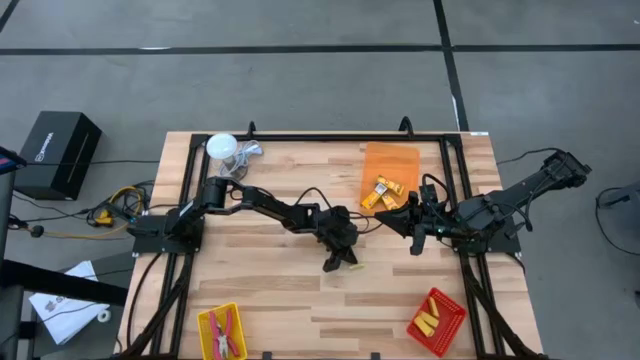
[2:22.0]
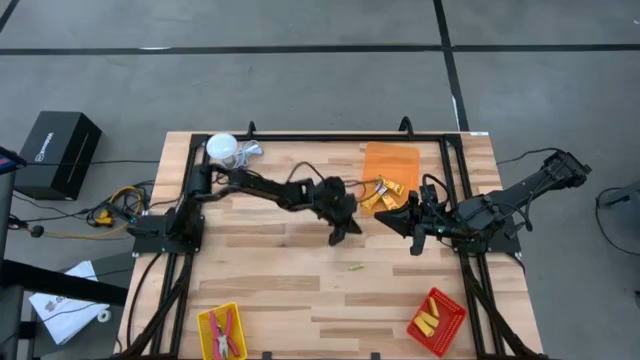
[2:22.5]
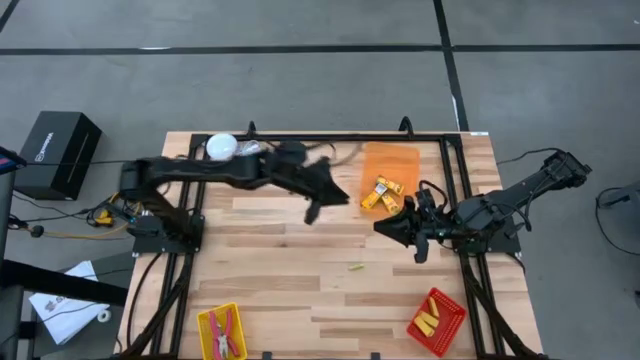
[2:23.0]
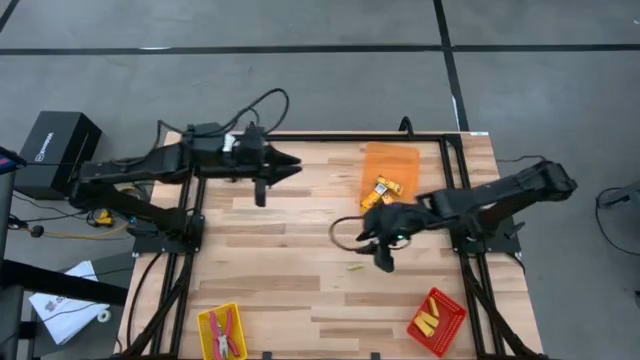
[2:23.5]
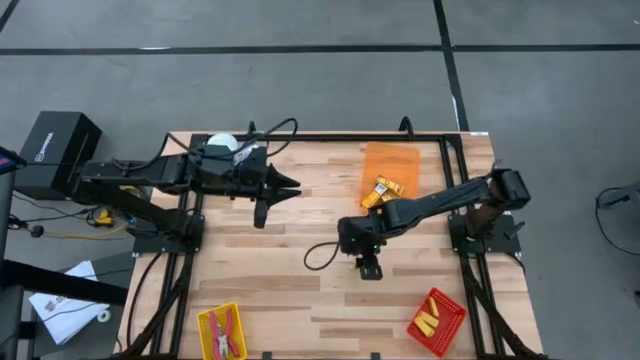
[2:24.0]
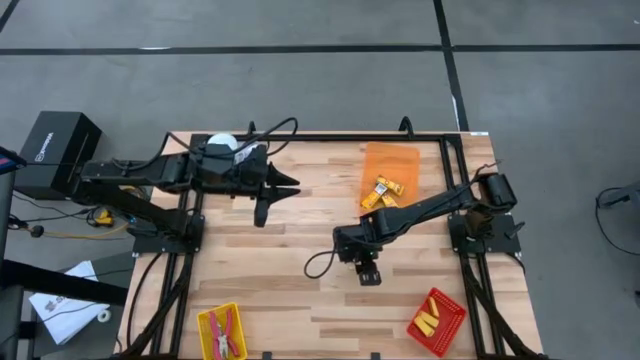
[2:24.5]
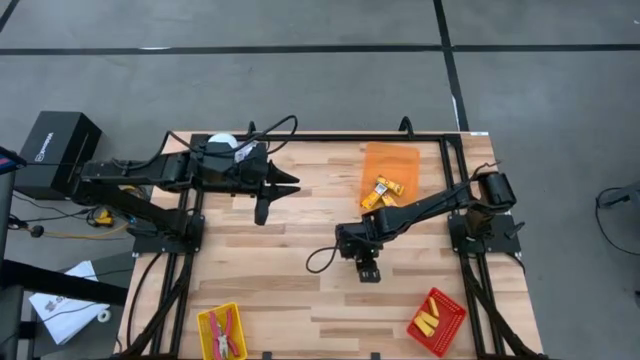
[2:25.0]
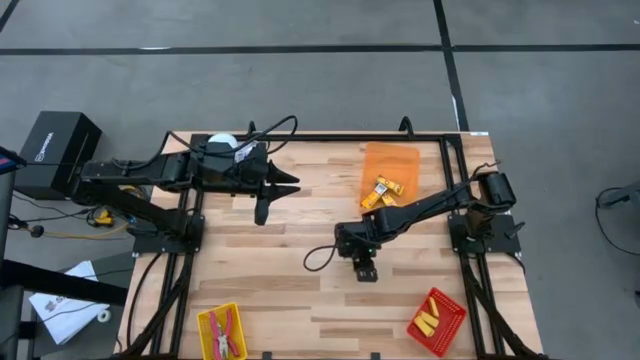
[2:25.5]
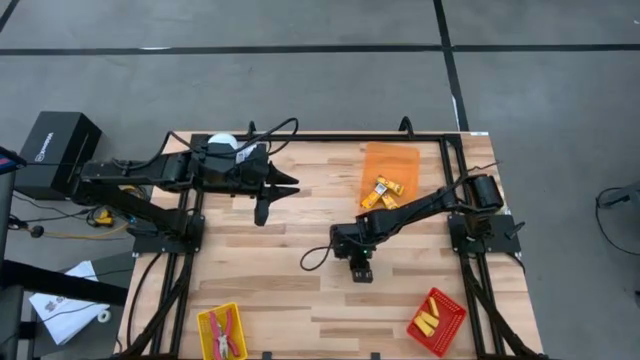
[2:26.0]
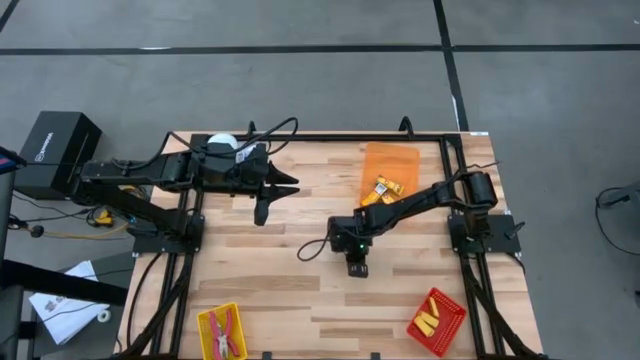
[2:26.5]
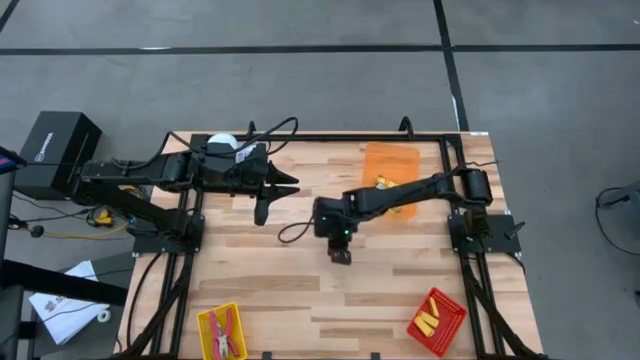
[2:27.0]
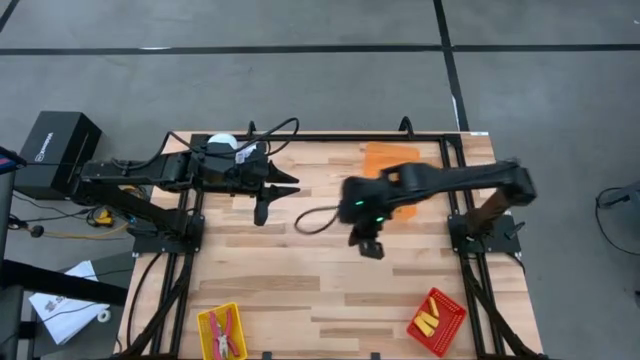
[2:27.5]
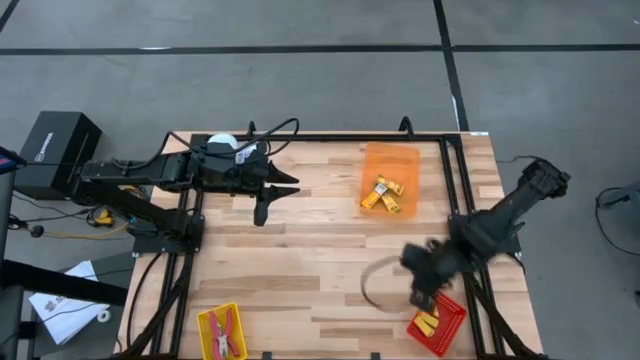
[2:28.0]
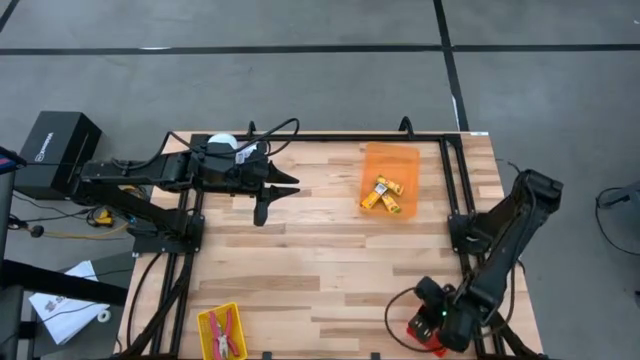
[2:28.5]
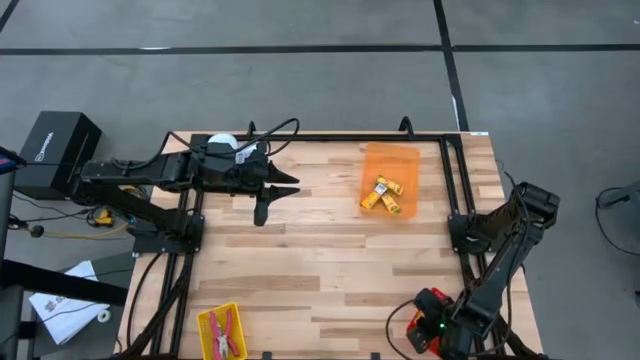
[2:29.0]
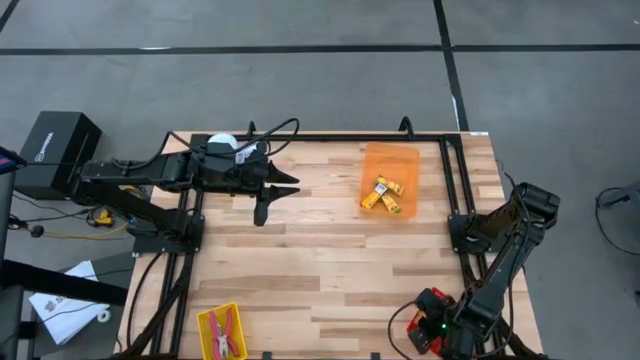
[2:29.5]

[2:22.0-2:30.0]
Task: Pick & Place School Supplies
Put the yellow eraser into the red bin

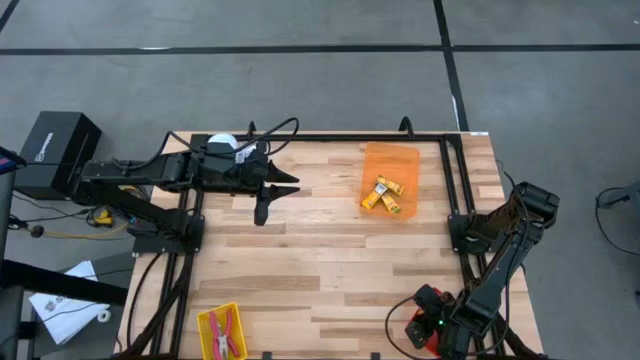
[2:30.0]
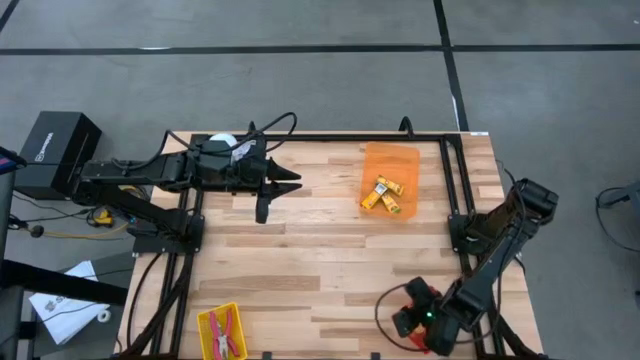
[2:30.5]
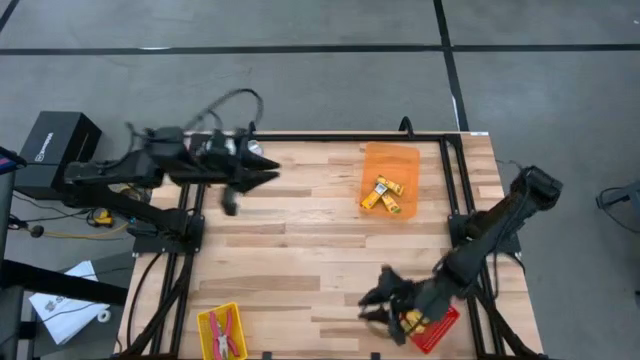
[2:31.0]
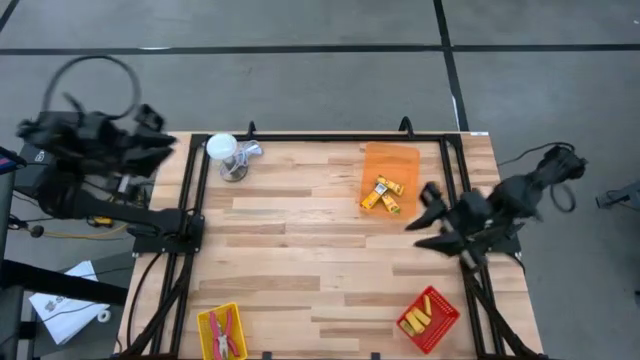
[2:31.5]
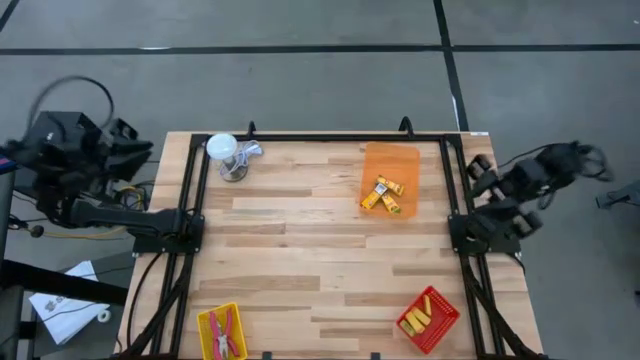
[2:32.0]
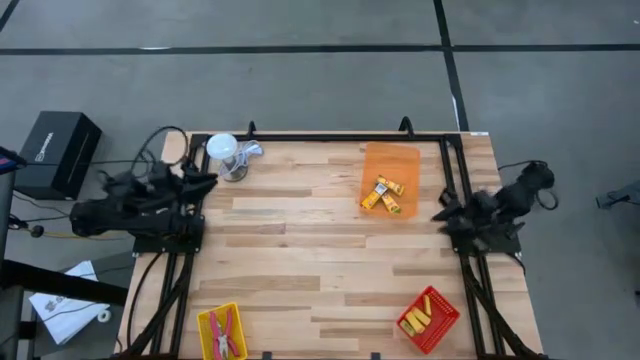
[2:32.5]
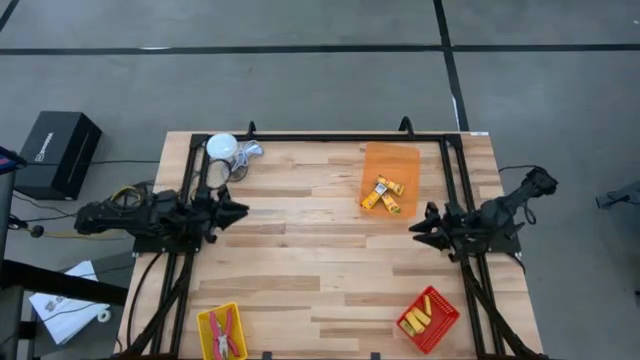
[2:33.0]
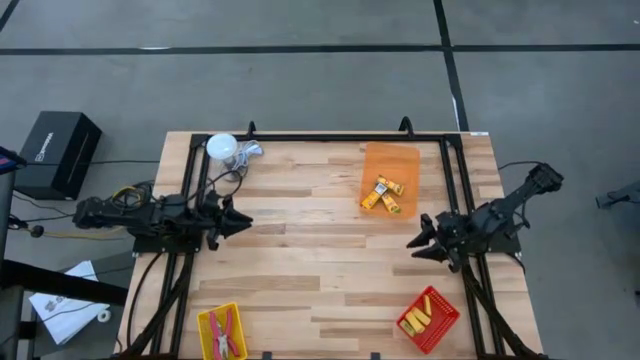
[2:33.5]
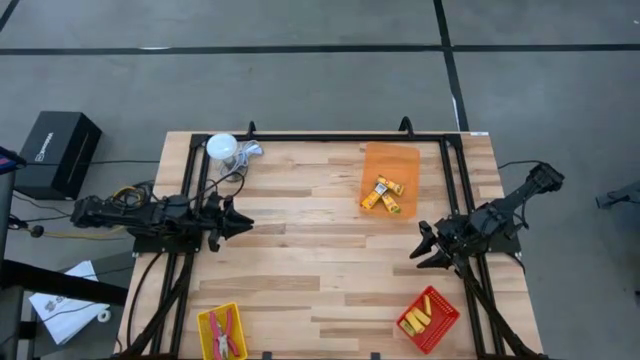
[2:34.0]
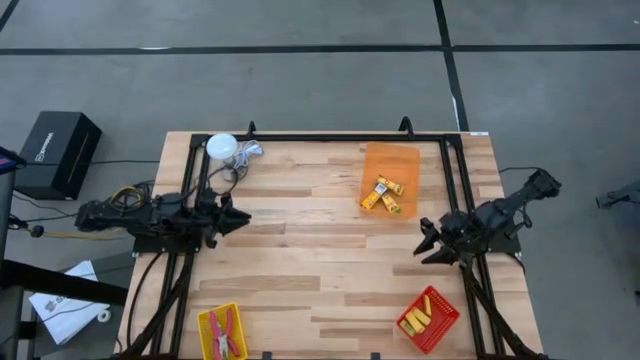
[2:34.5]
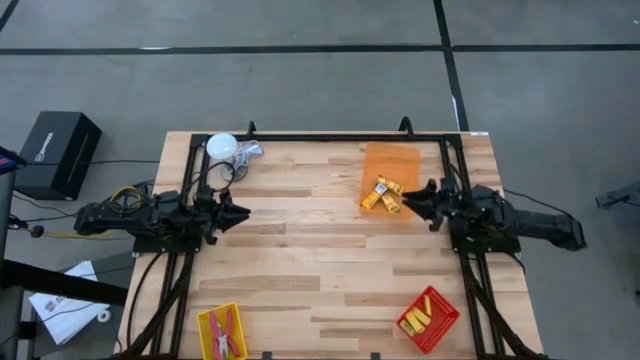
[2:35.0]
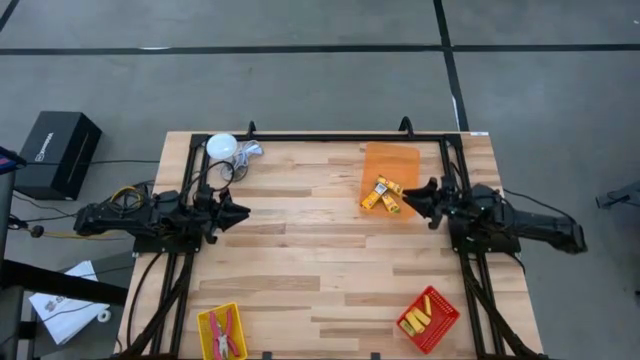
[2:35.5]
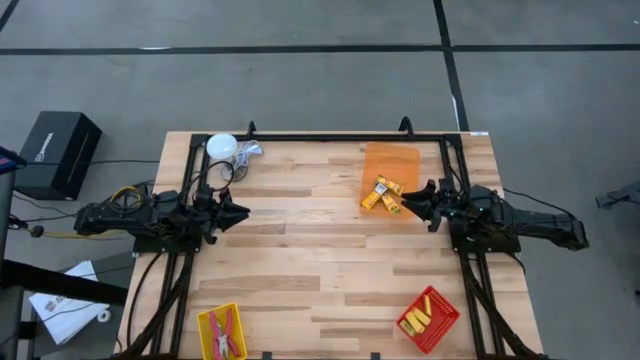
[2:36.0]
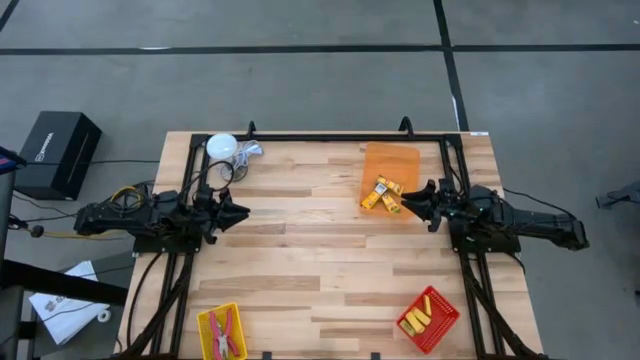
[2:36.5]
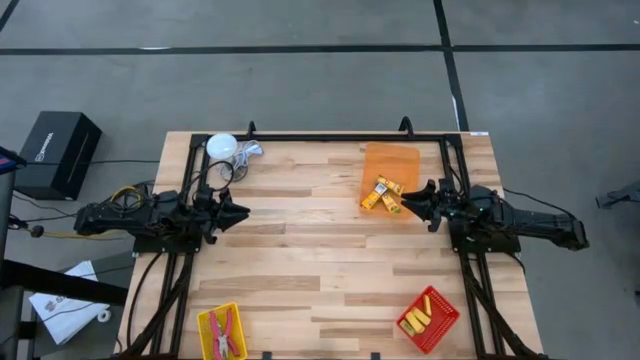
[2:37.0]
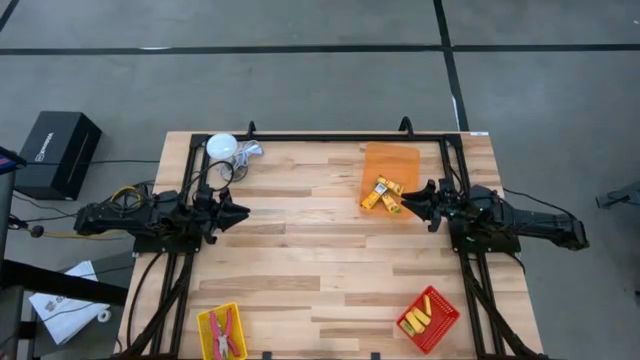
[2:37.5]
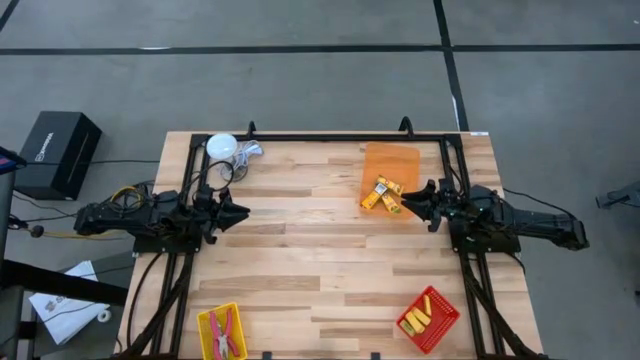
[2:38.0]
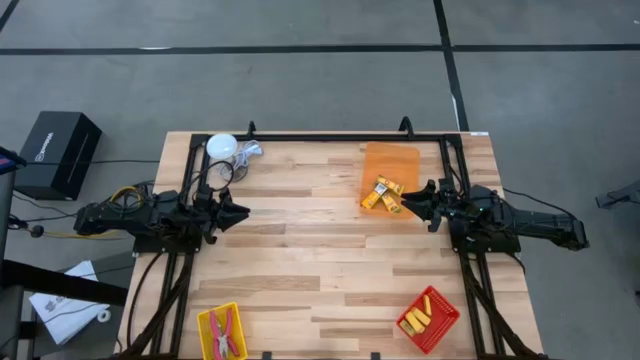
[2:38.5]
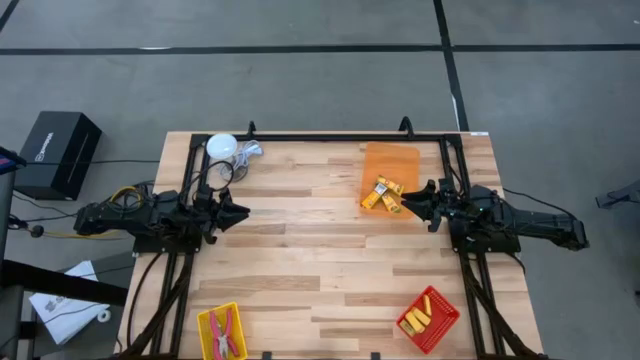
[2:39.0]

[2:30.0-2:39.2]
Return to Home Position

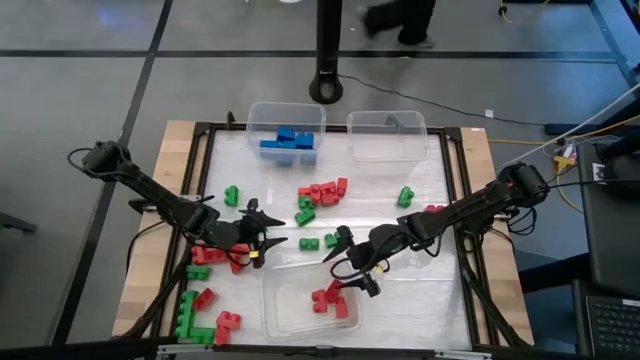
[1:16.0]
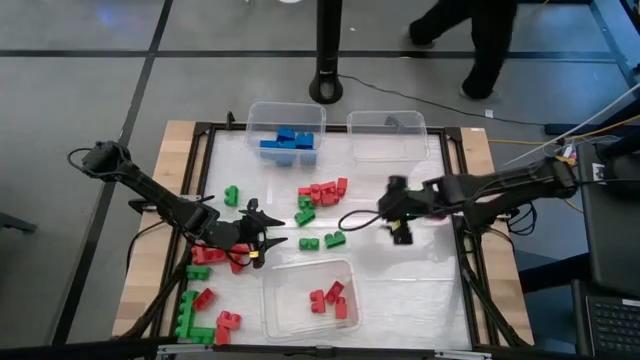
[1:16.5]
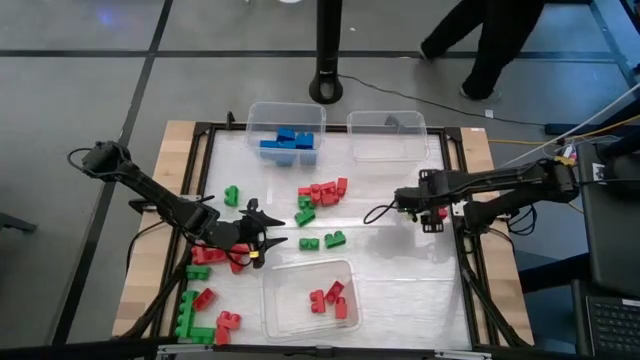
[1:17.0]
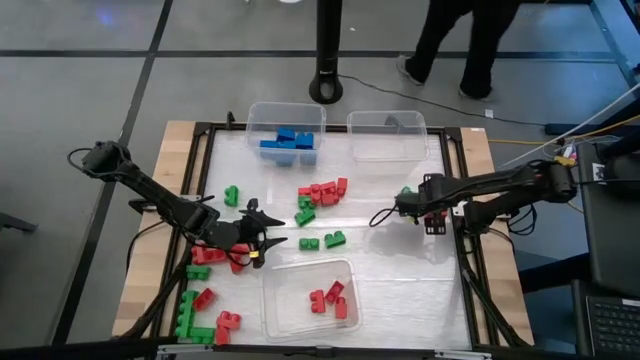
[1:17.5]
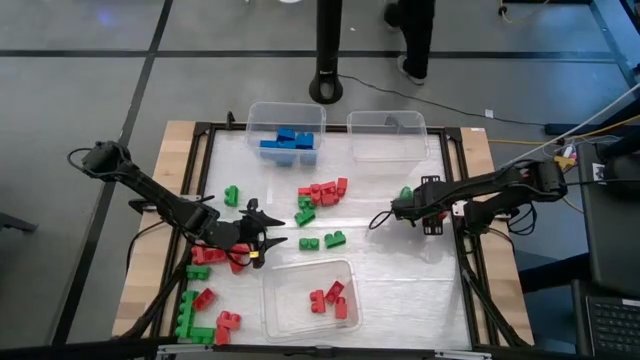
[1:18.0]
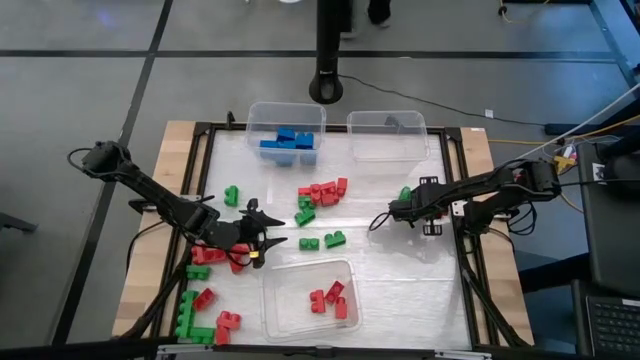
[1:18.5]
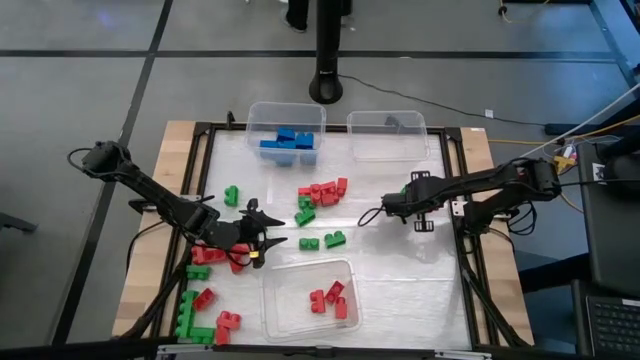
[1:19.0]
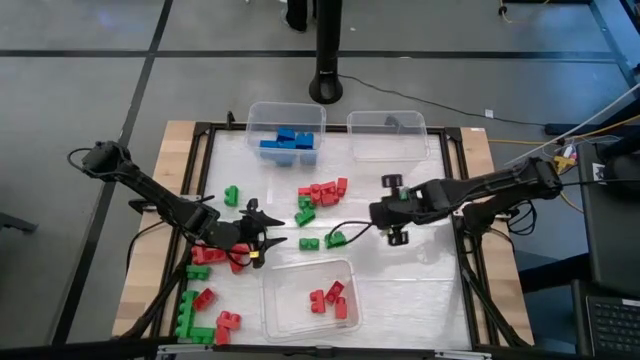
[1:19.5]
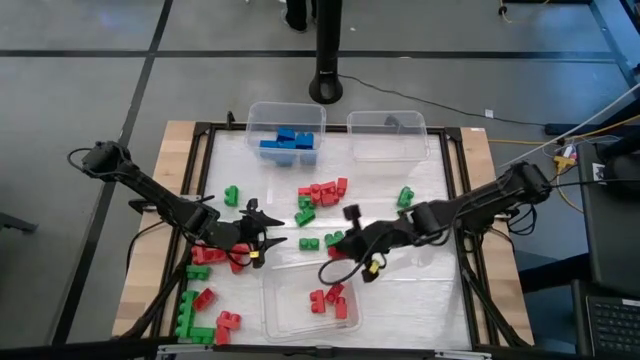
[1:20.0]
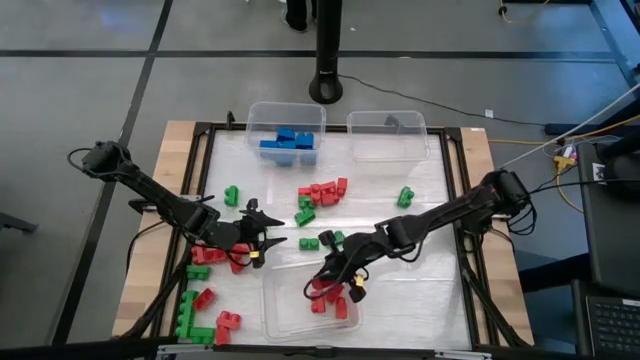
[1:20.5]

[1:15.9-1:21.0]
Task: Sort blocks
Put the red game piece into the bottom transparent bin
